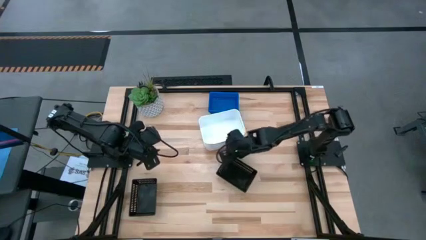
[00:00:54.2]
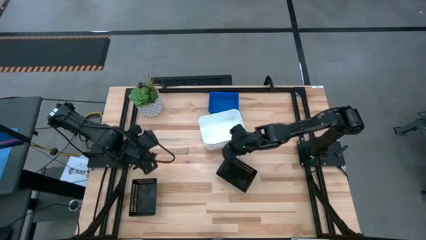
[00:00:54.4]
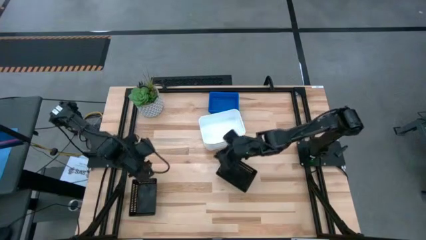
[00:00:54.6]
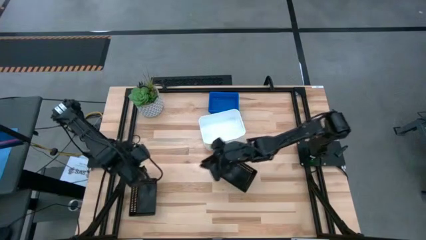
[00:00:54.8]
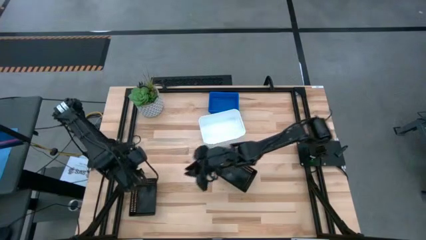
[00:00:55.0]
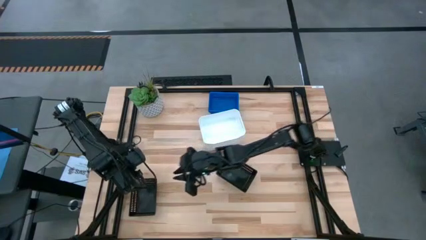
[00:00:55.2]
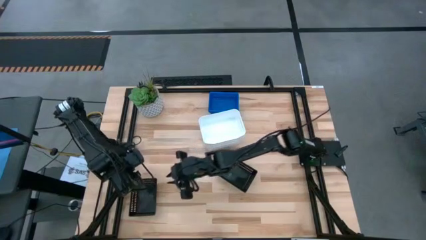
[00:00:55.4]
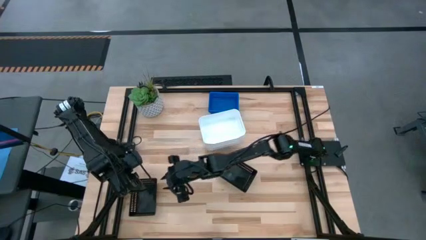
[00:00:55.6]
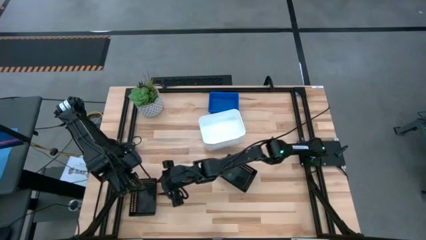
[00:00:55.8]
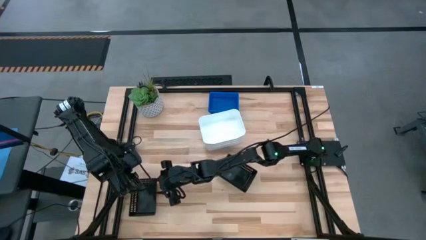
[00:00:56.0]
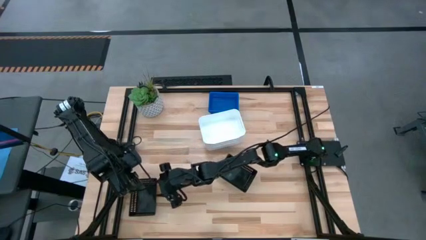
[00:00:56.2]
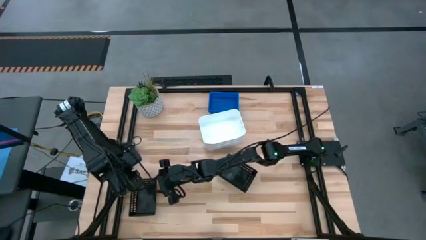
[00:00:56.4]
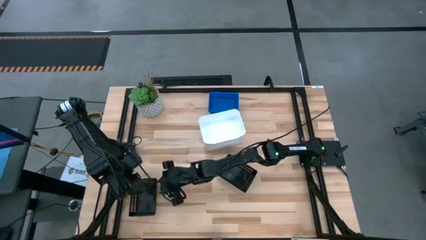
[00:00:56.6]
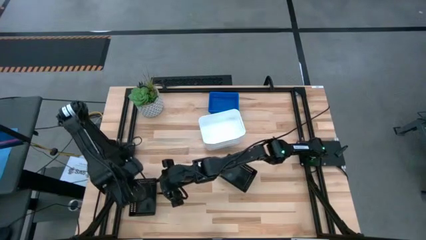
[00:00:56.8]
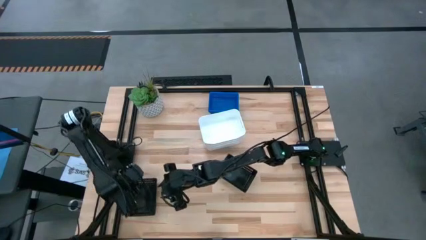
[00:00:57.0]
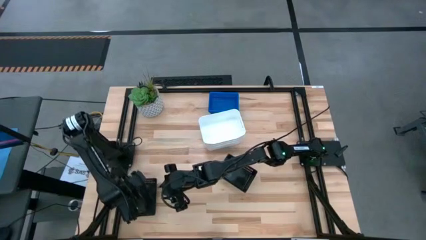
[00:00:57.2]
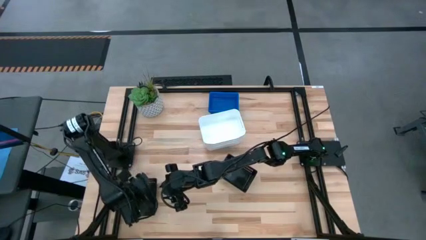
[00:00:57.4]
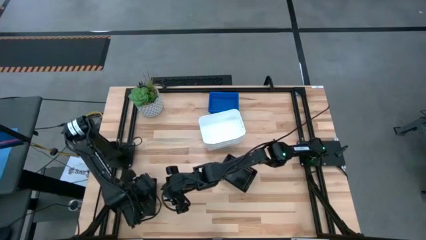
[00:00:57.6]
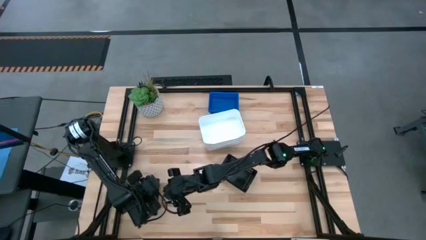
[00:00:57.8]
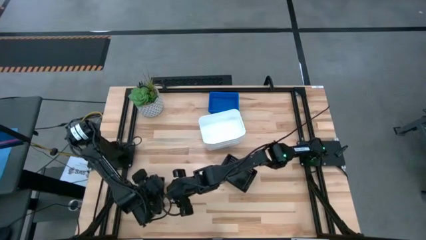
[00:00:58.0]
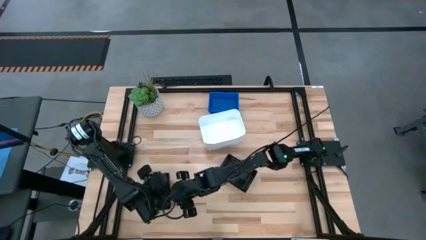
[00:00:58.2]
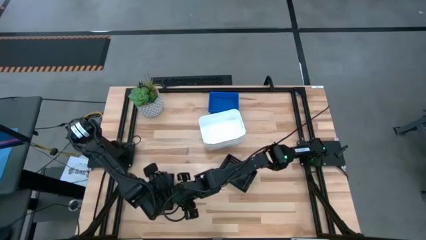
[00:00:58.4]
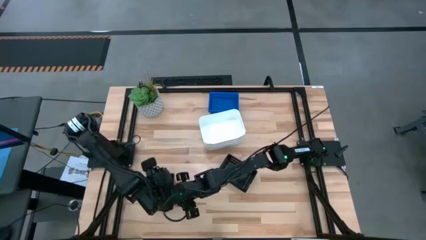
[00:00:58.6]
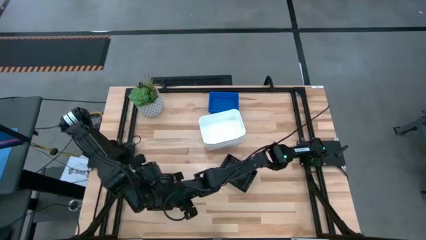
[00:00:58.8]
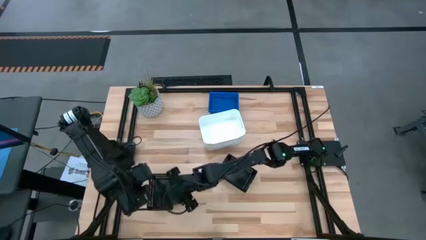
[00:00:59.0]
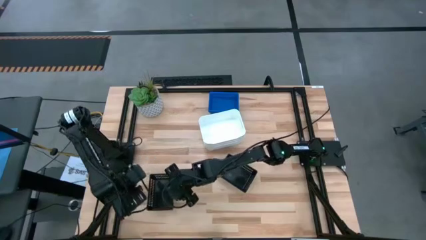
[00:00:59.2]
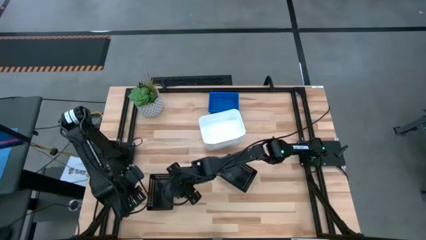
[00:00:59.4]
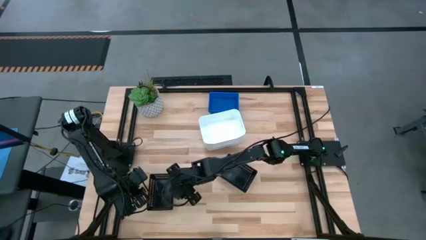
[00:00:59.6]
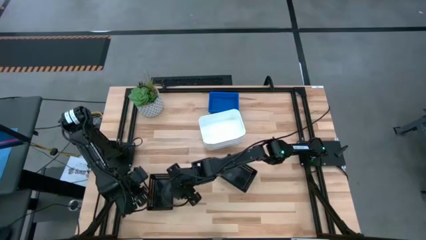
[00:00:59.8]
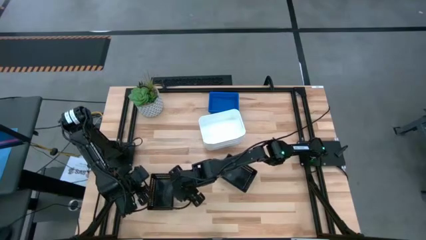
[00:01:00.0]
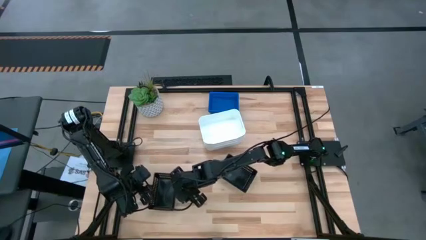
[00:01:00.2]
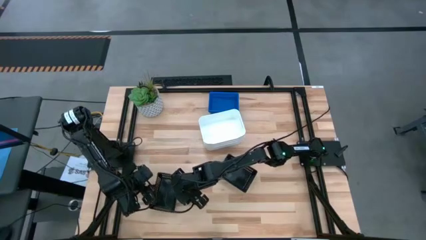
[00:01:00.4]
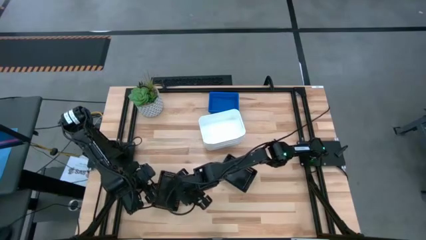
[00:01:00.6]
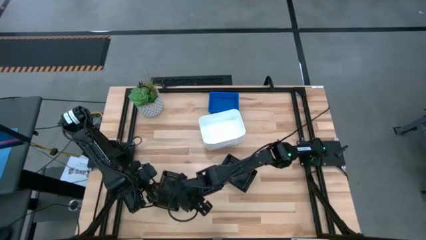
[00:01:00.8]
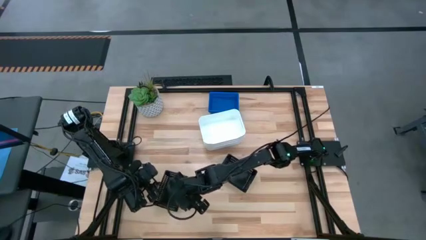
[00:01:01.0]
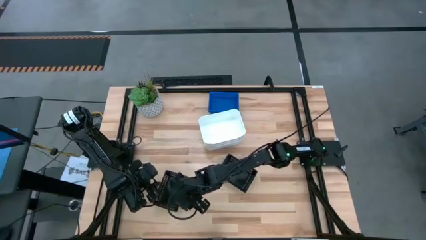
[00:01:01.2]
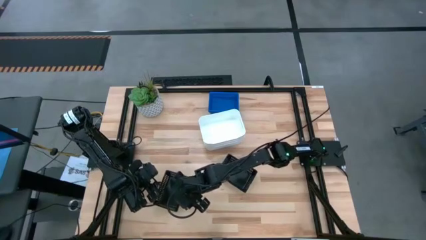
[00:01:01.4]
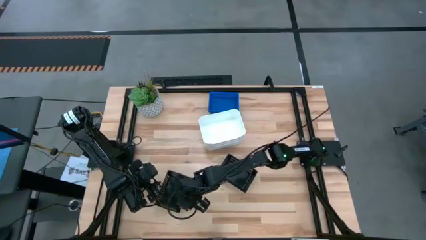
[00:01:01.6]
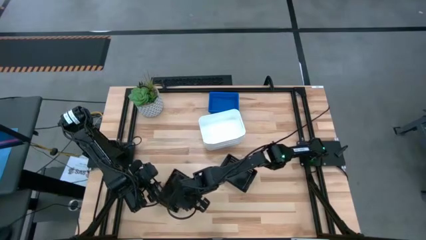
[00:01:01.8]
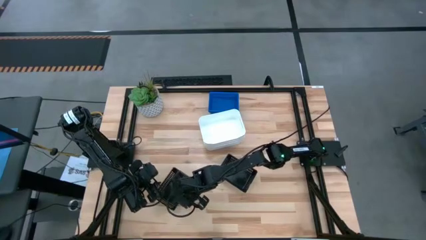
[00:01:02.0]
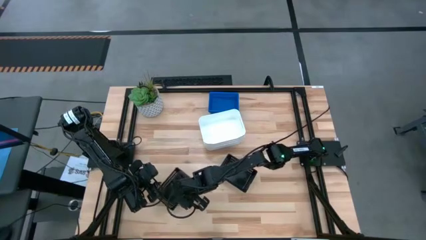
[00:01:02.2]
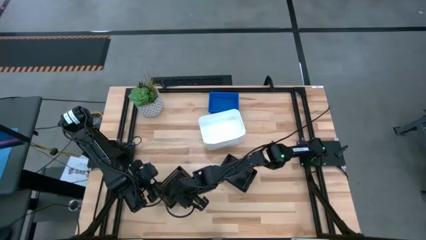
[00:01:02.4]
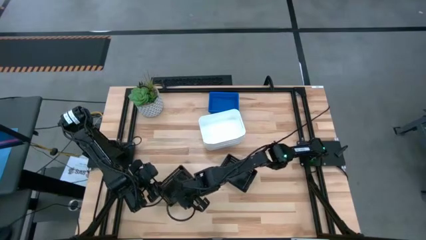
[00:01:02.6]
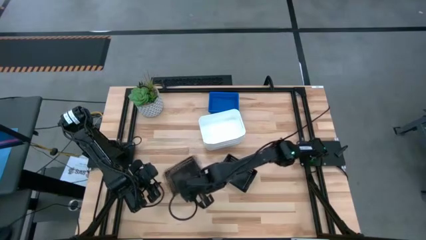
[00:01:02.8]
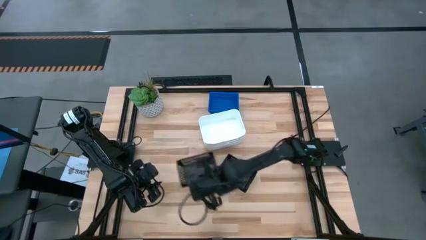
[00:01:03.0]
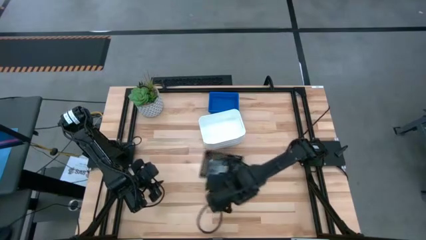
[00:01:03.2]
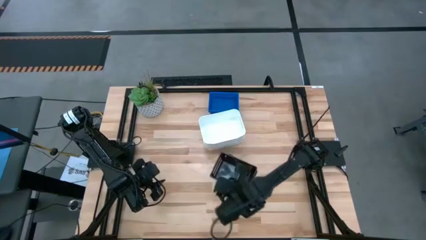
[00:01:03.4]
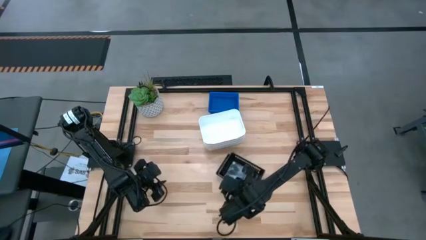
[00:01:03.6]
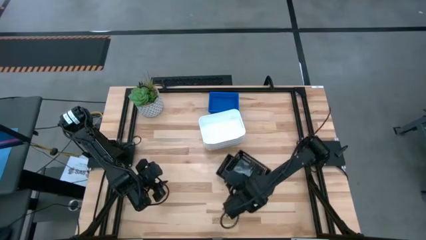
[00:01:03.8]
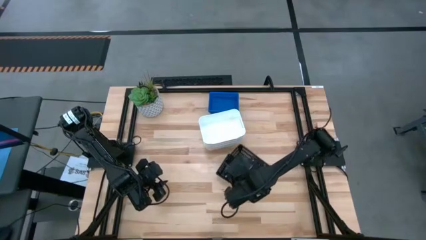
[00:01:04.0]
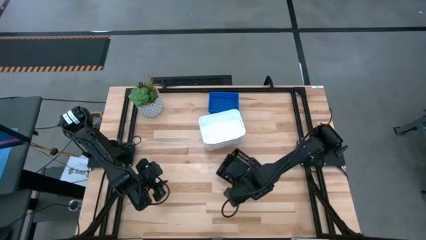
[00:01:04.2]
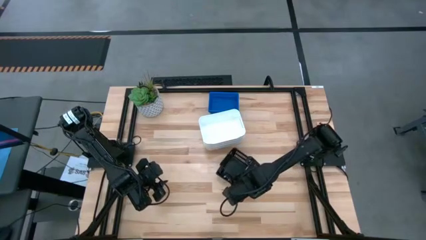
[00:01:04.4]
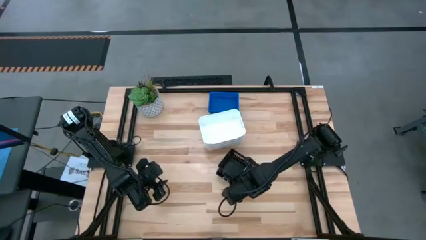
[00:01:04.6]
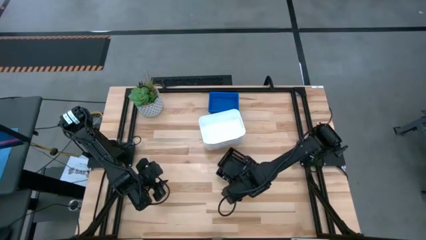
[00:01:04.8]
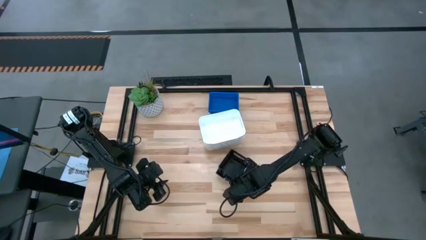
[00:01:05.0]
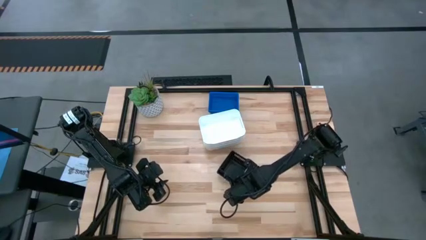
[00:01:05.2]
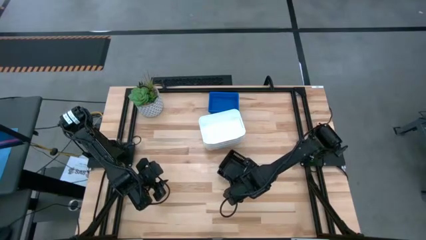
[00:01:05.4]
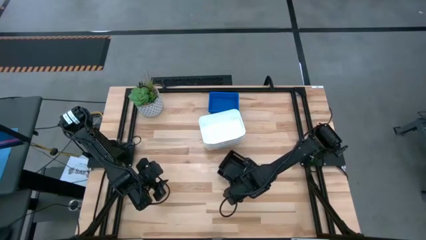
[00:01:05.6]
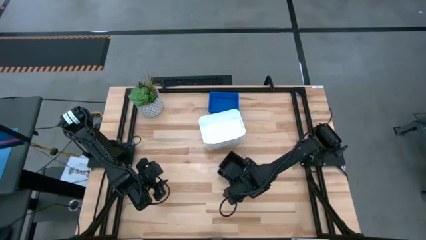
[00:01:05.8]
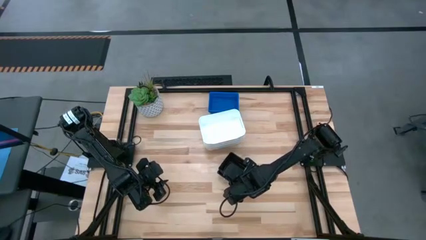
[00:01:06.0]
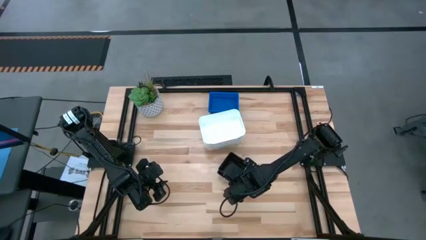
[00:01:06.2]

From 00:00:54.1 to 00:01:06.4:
Stack the left black bin on the black bins

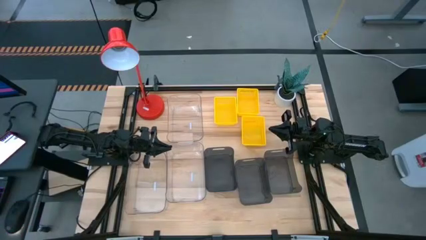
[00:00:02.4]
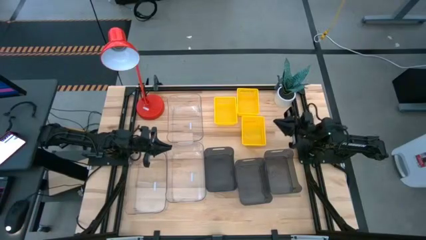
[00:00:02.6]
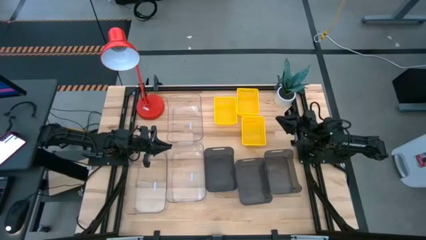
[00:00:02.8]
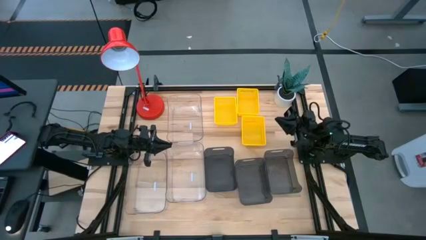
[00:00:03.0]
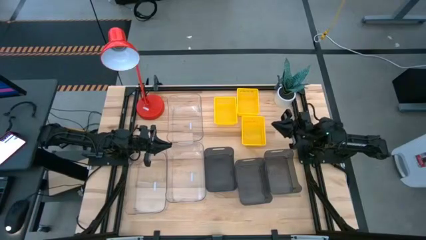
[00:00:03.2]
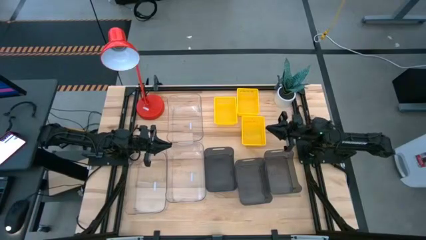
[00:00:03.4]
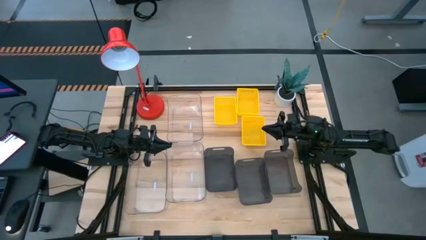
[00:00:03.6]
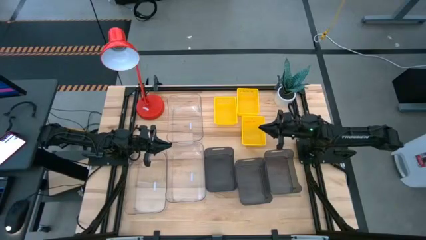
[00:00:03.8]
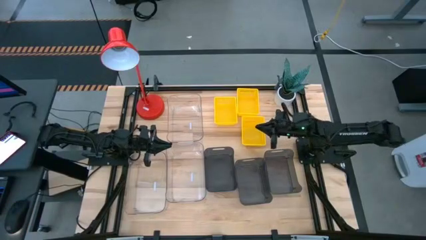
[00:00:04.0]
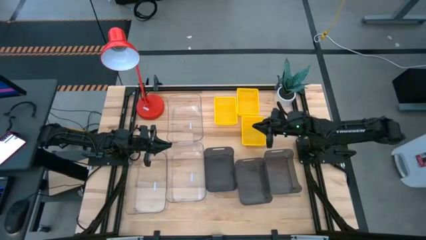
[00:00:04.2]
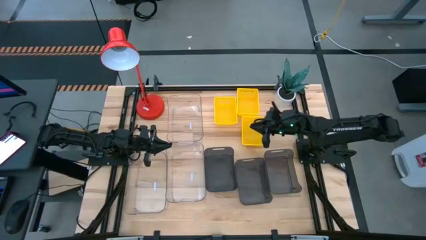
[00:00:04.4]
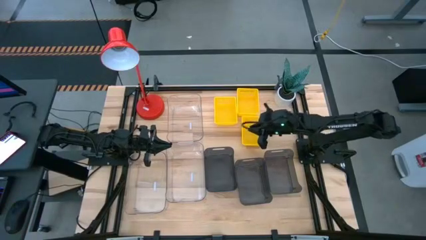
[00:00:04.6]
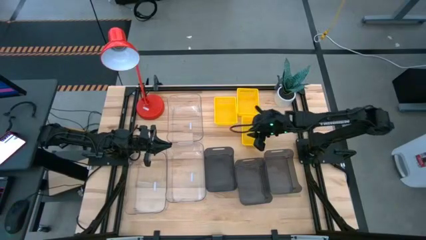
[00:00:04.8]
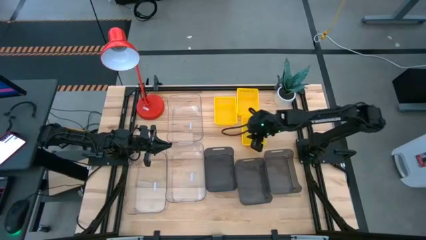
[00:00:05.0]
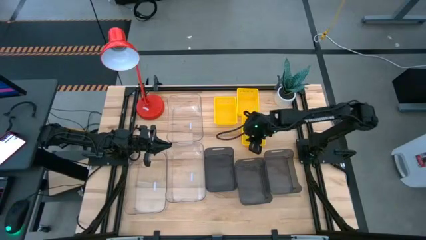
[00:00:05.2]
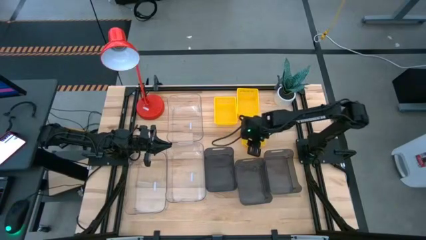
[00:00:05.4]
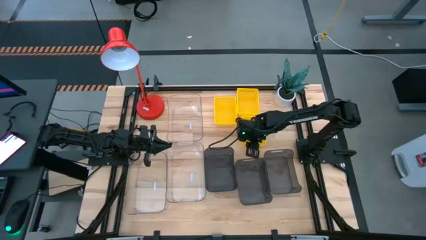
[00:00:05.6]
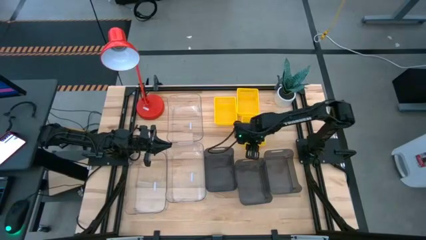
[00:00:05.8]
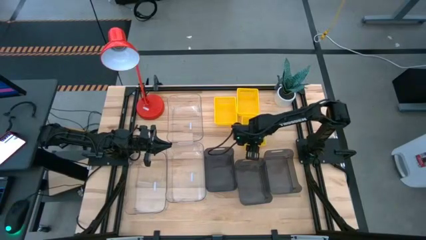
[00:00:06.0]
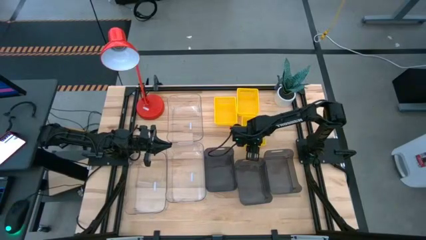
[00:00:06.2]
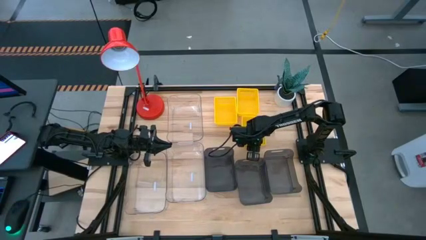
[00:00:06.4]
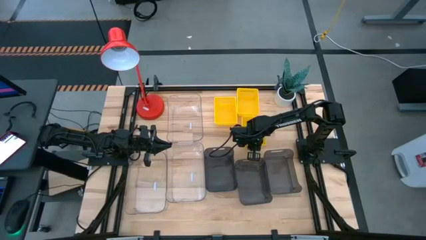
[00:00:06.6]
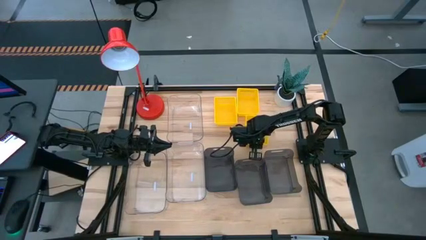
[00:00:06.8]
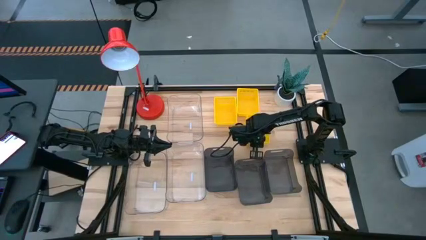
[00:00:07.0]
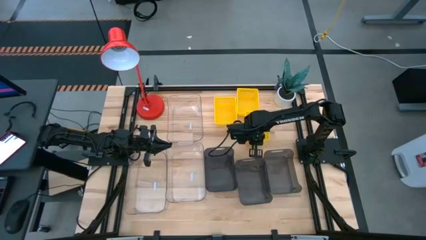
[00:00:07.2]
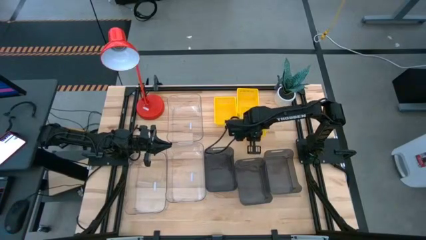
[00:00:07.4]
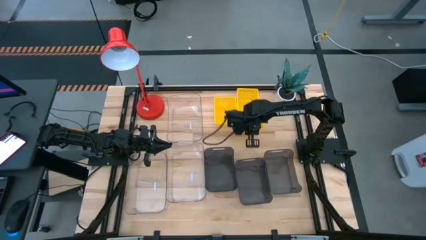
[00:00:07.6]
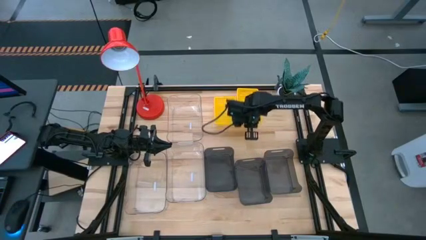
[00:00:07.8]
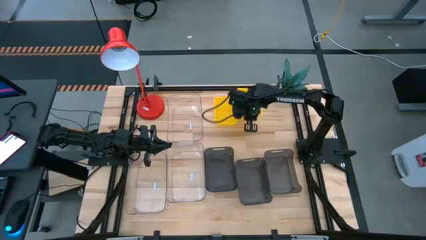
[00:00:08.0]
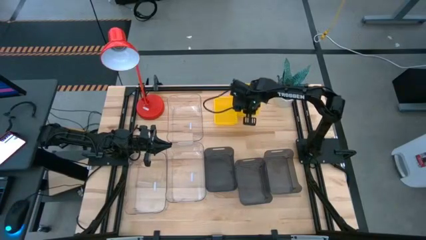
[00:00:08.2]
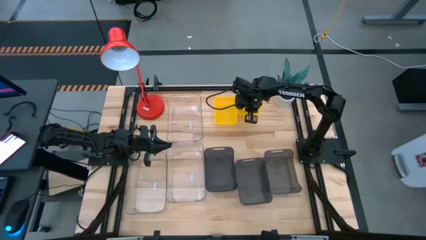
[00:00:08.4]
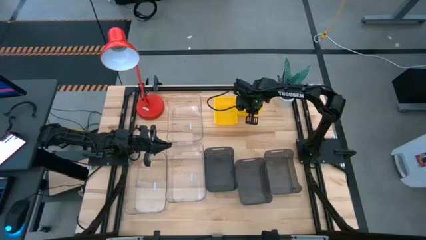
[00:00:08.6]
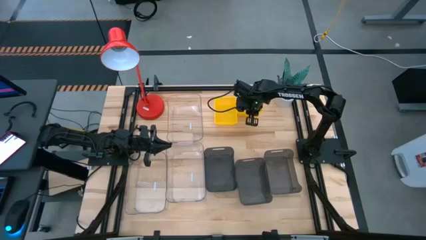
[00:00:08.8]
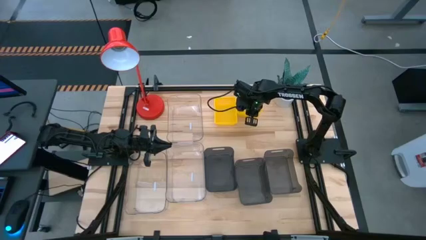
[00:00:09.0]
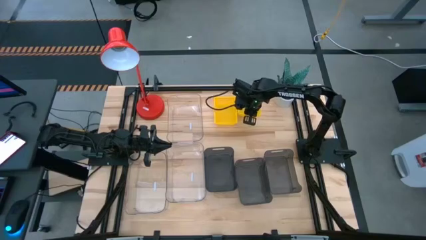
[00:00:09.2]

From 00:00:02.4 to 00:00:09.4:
Stack the bottom yellow bin on the right yellow bin
